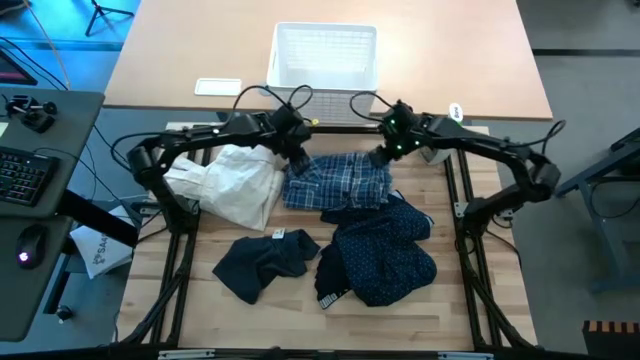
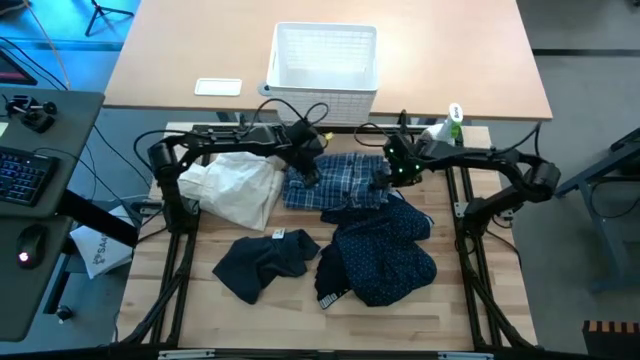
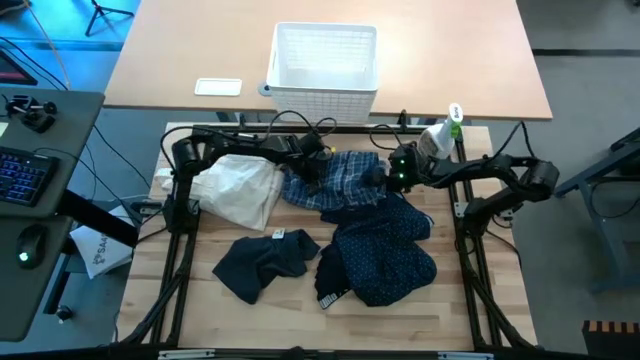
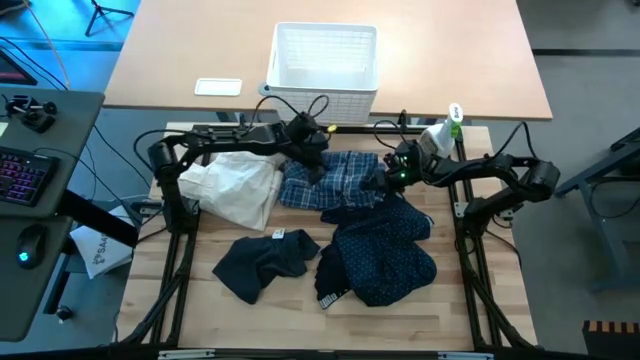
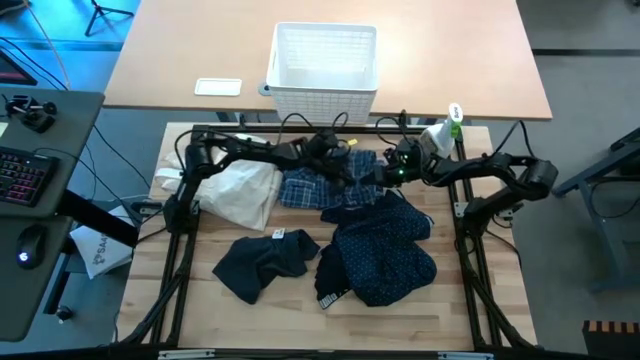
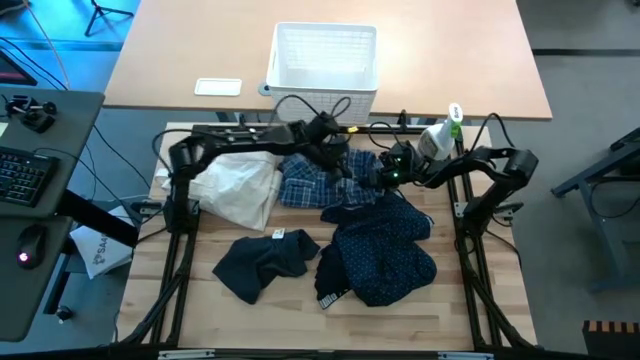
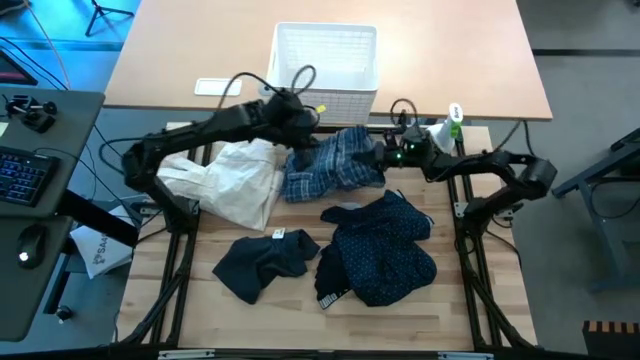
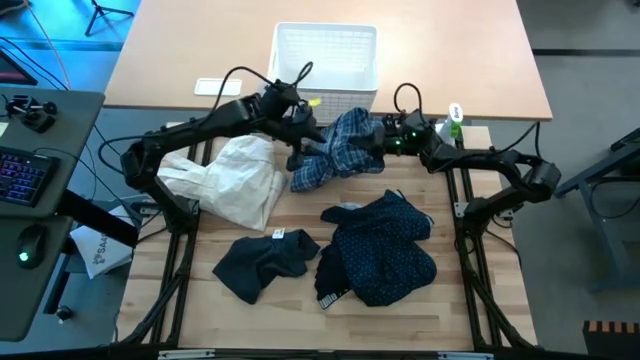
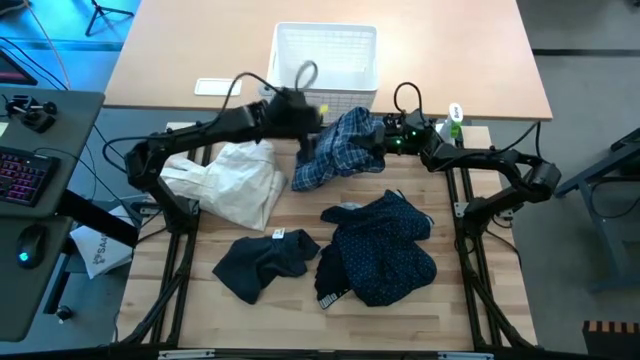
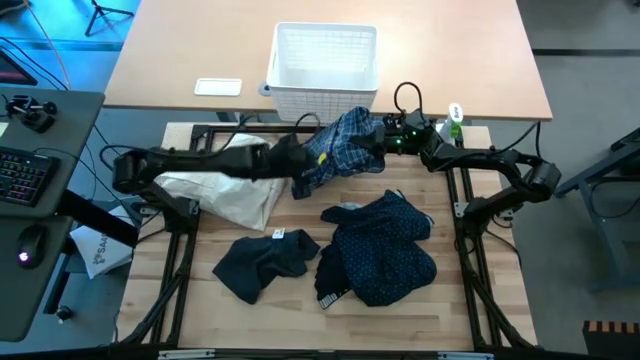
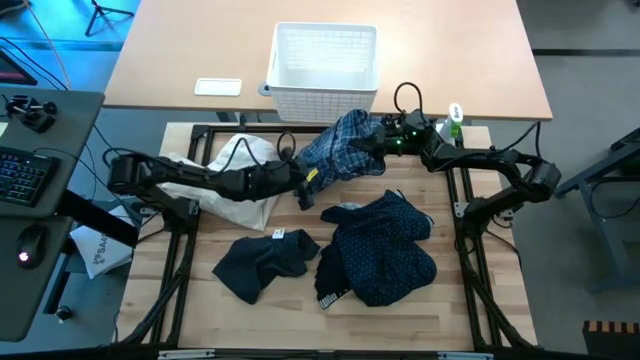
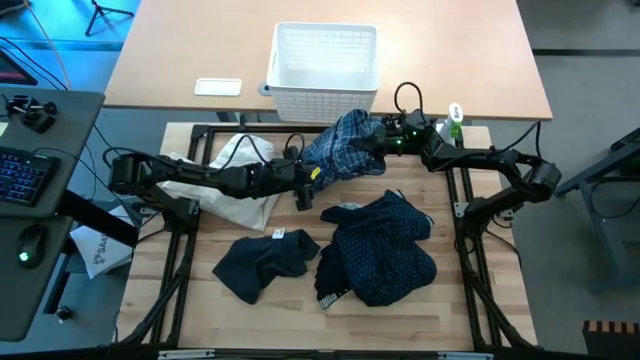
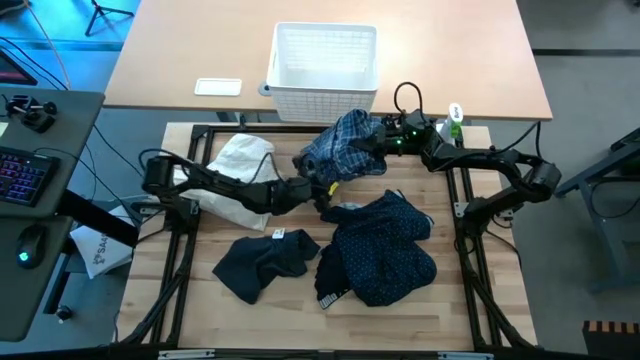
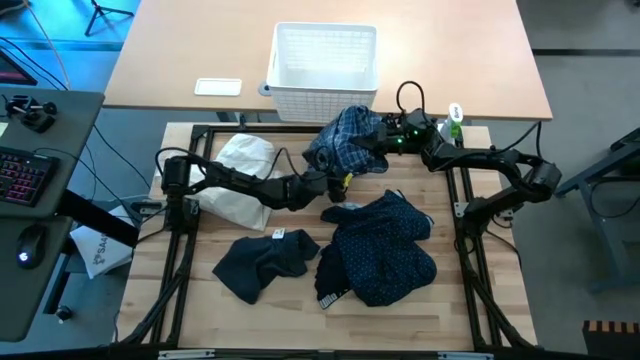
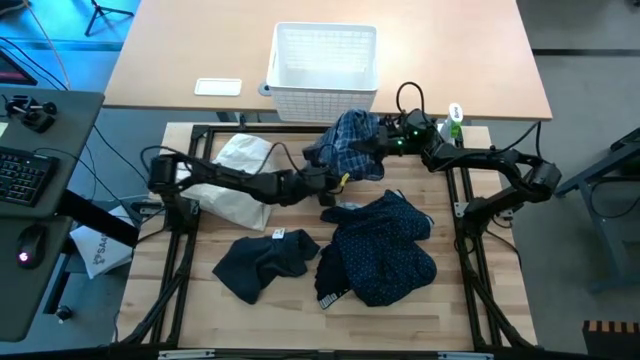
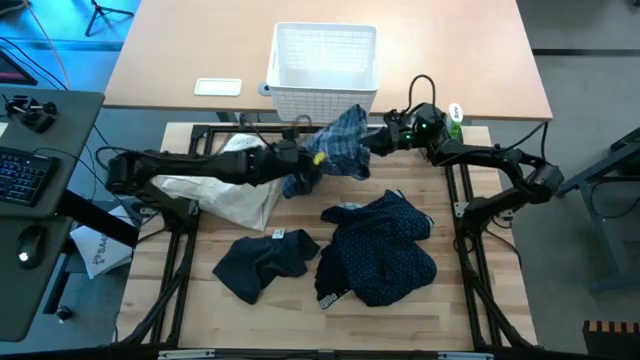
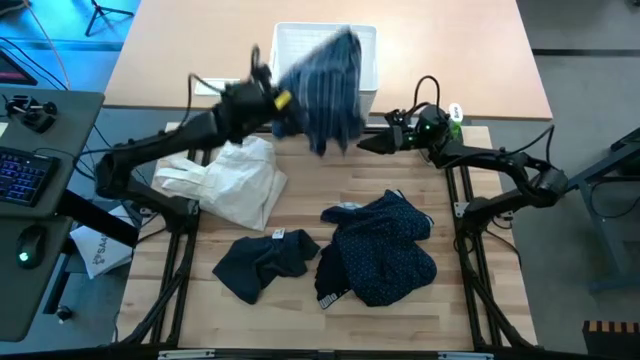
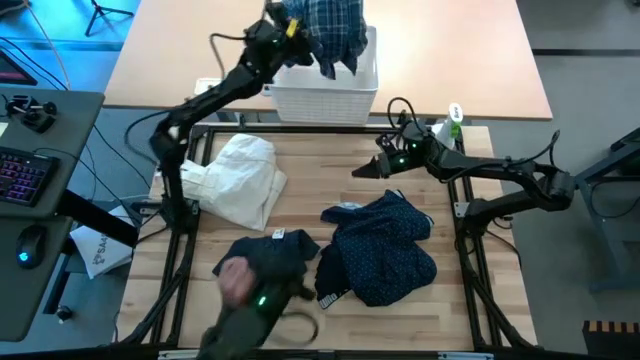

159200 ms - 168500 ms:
Task: Fold laundry
Put the blue plaid flannel shirt into the laundry bin

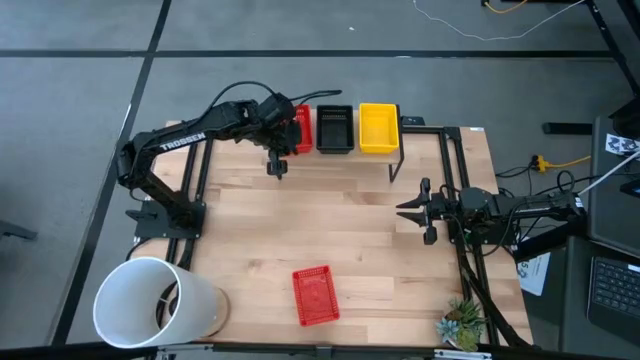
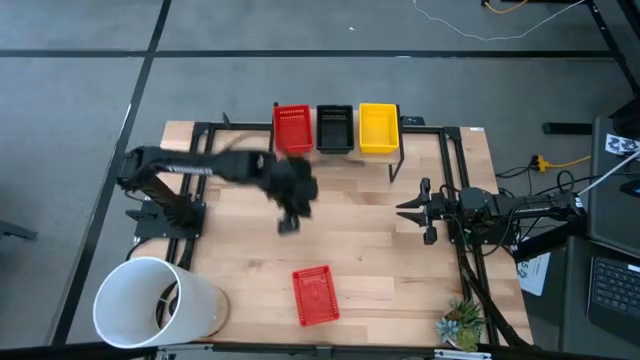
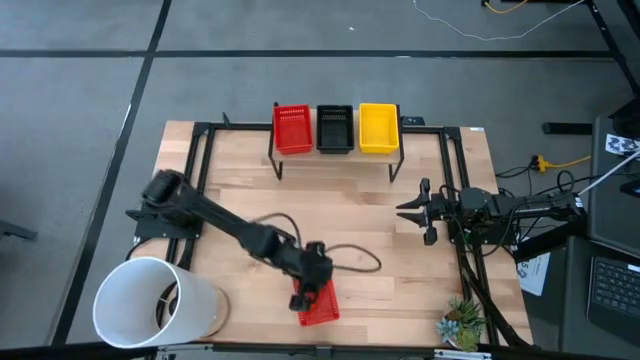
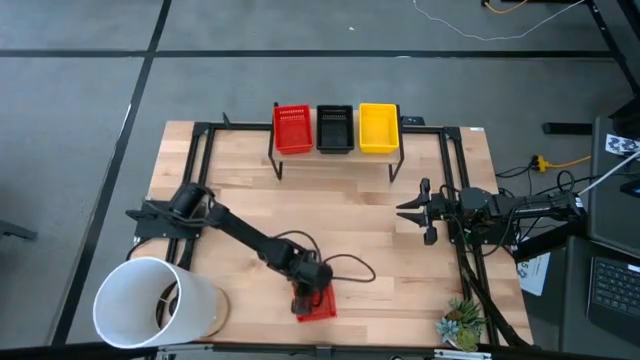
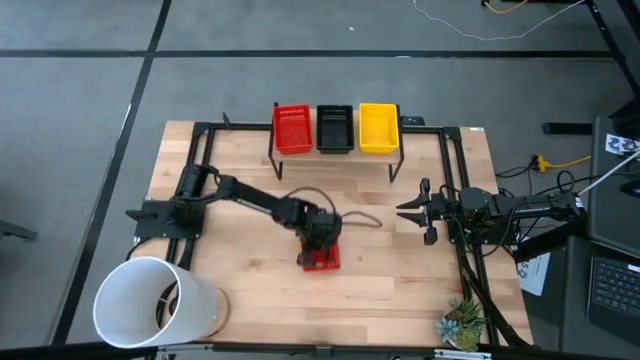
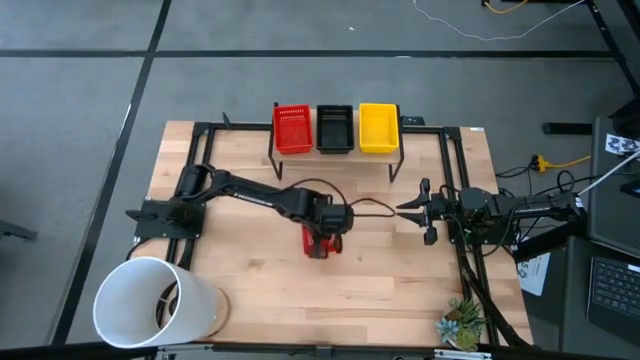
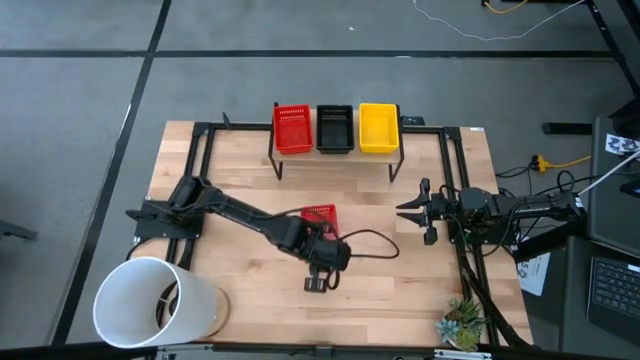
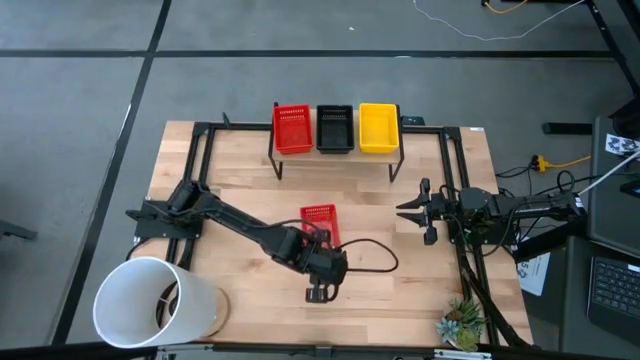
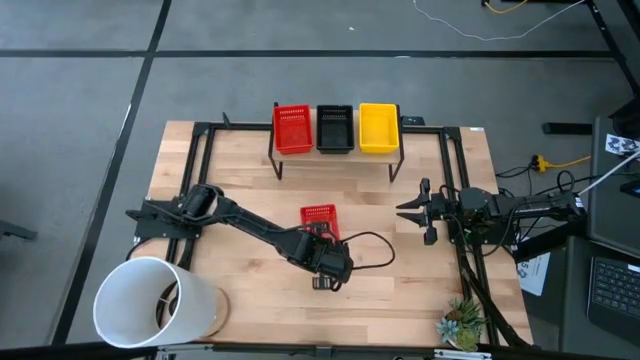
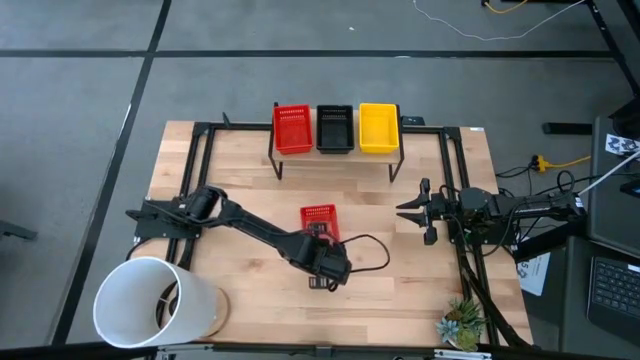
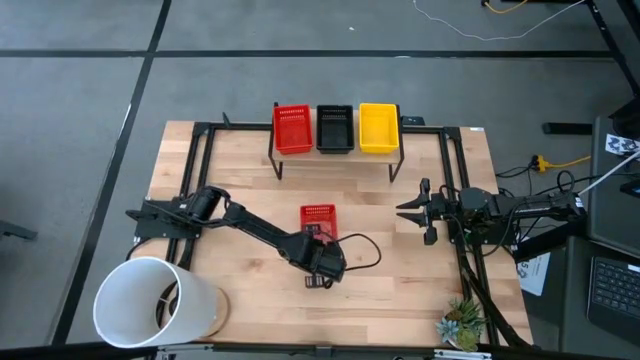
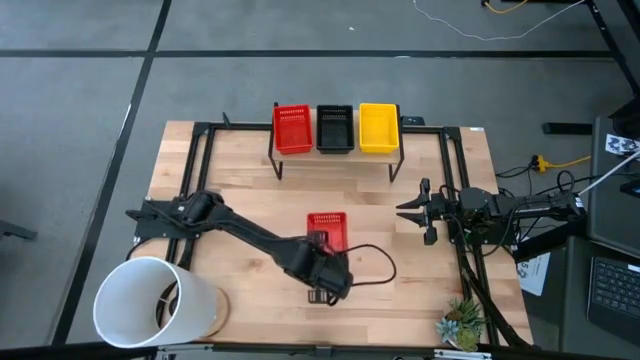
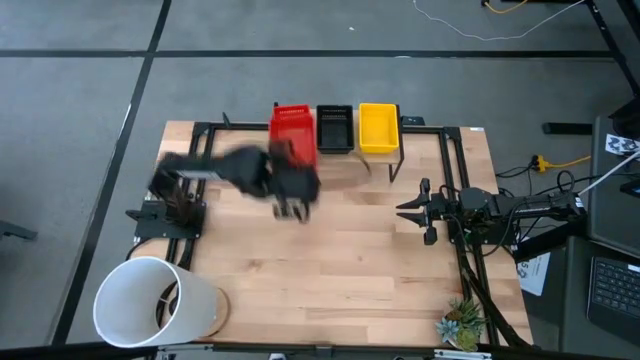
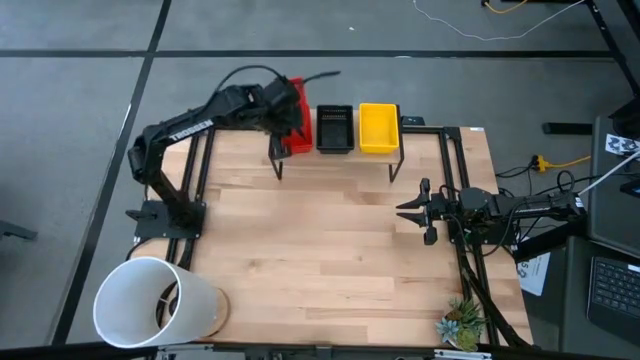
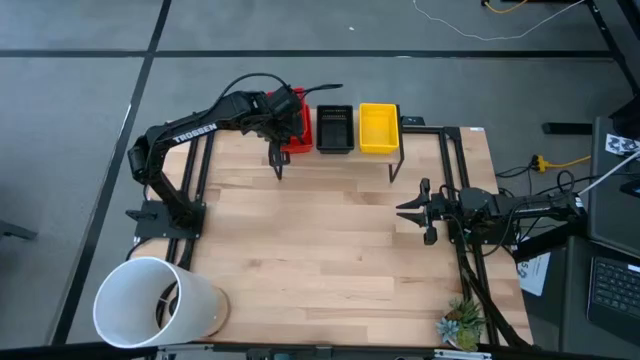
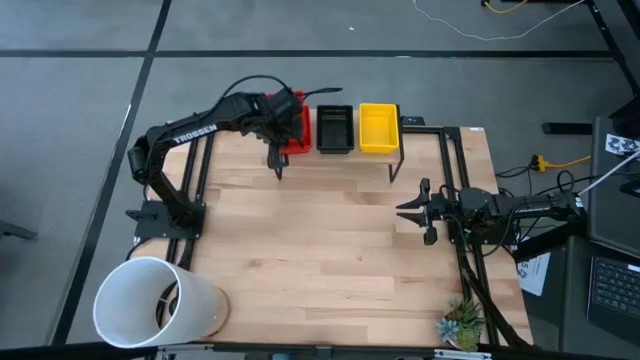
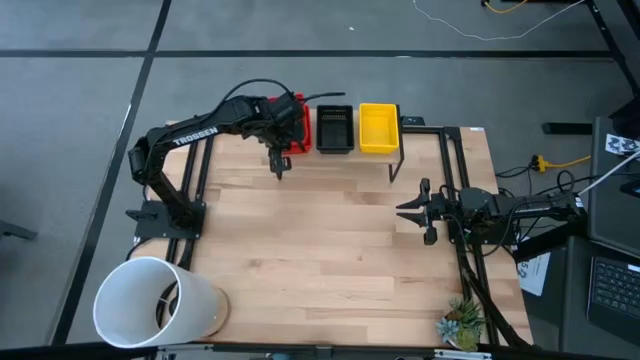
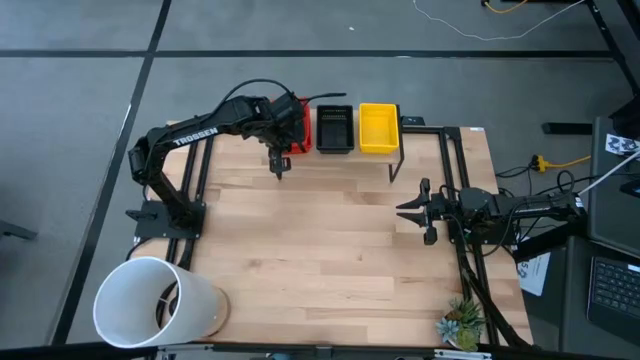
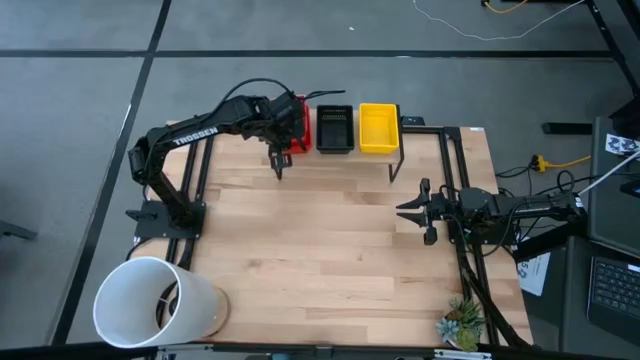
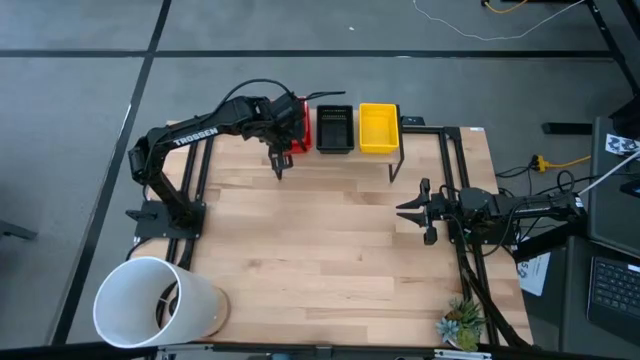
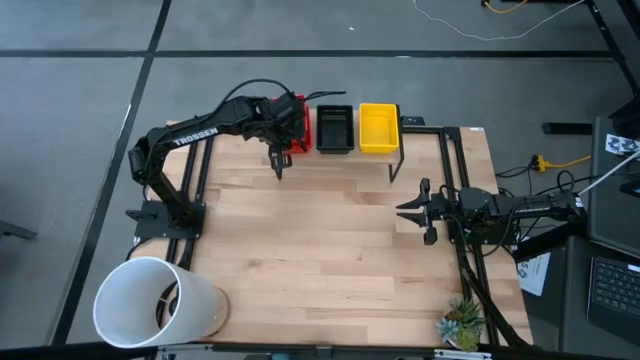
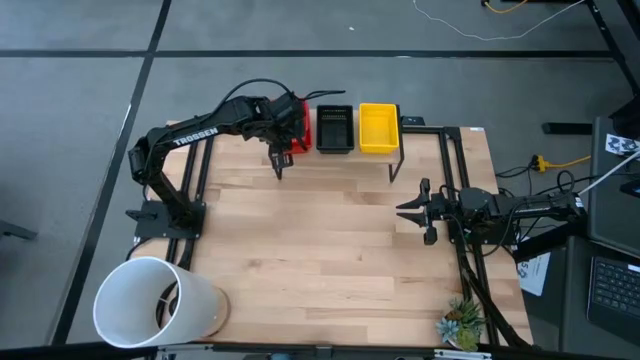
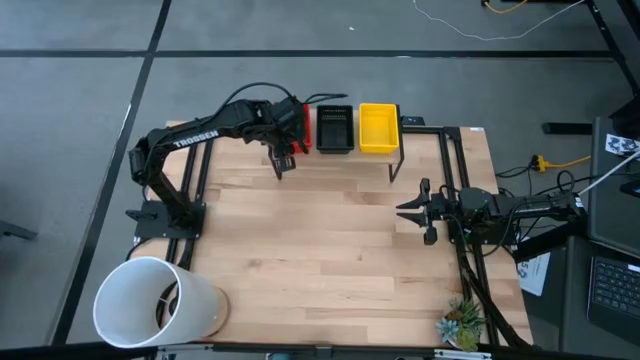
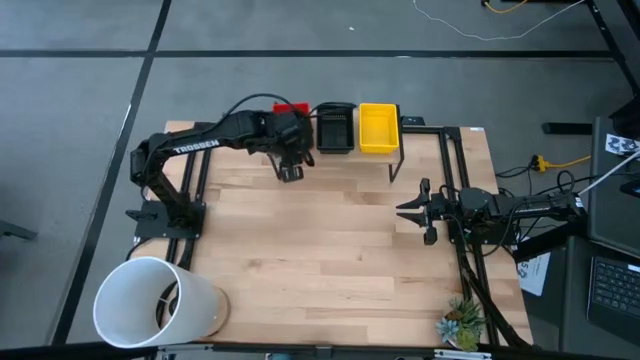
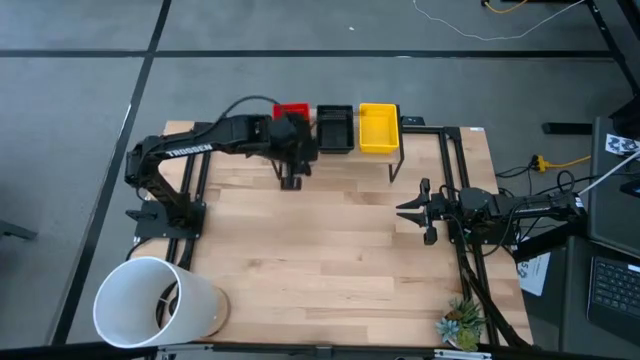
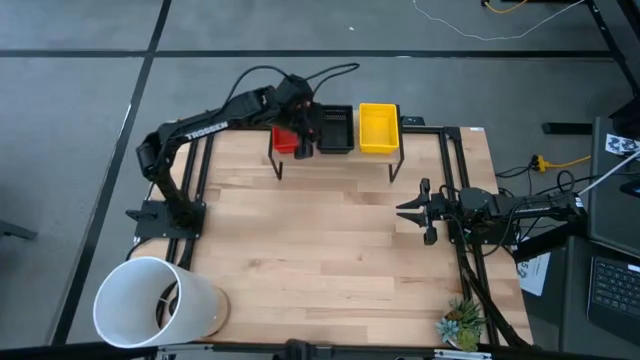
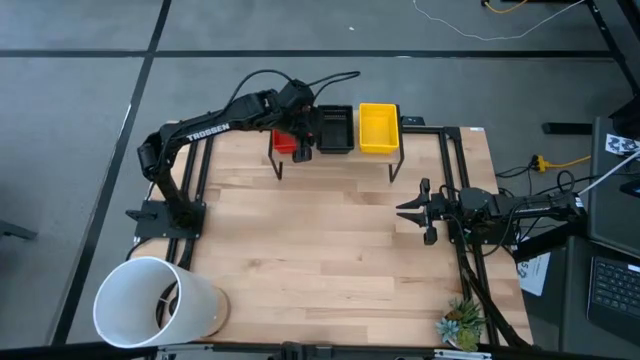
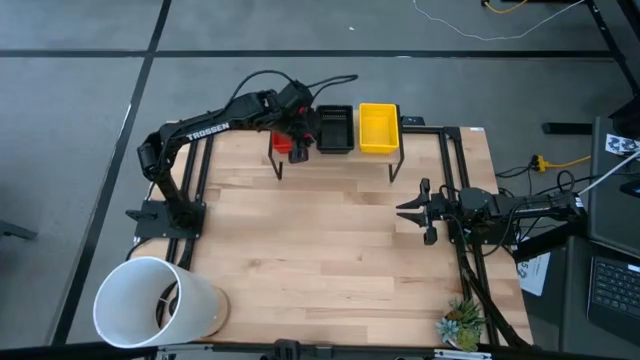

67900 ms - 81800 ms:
Task: Stack baskets on shelf by color
Stack the red basket on top of the red baskets on the shelf
